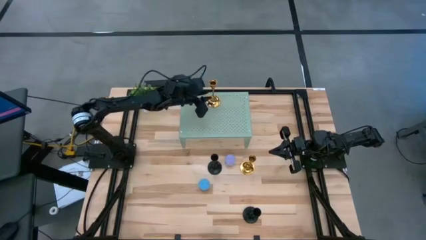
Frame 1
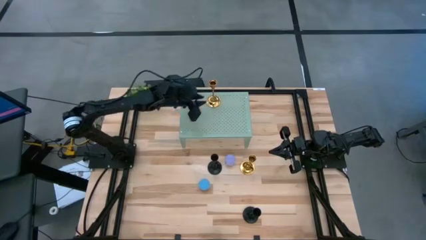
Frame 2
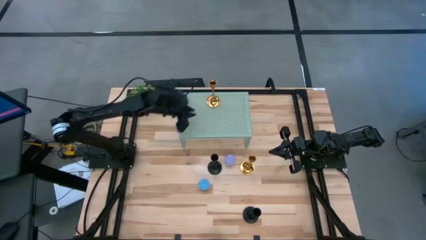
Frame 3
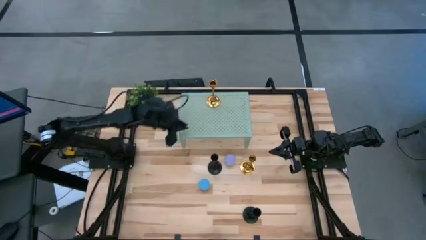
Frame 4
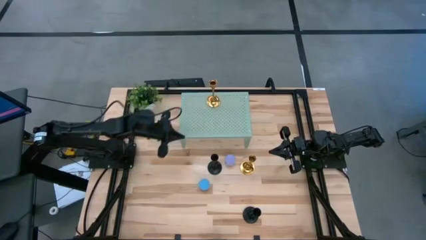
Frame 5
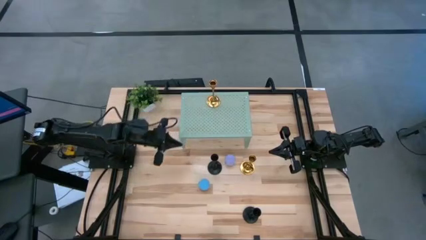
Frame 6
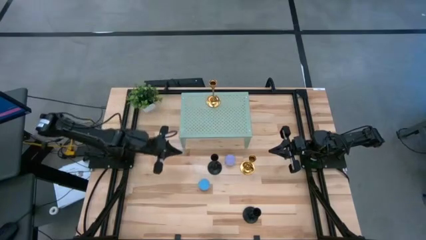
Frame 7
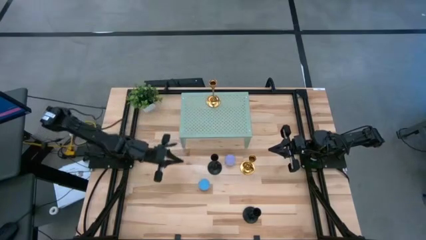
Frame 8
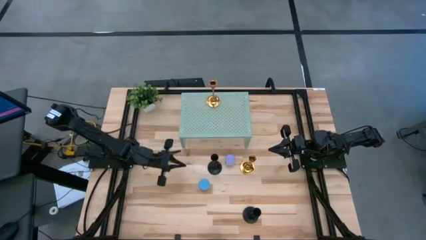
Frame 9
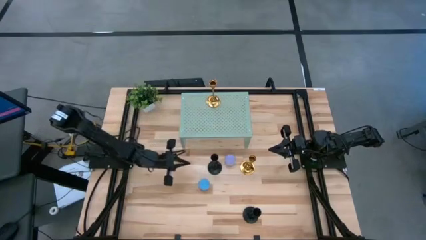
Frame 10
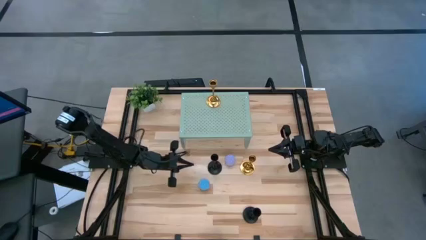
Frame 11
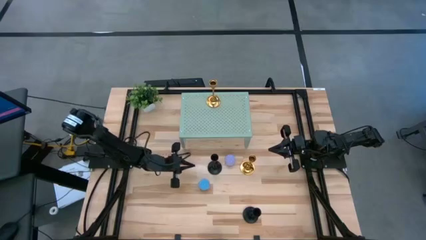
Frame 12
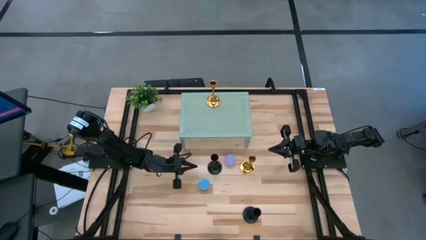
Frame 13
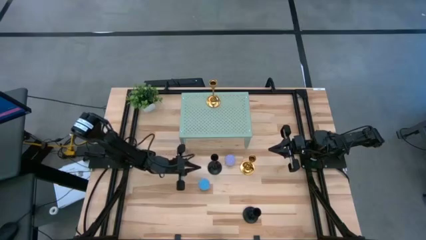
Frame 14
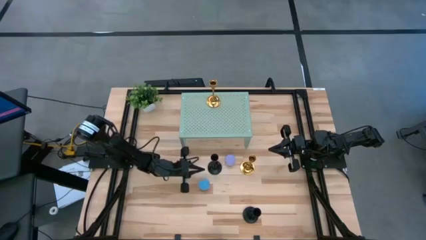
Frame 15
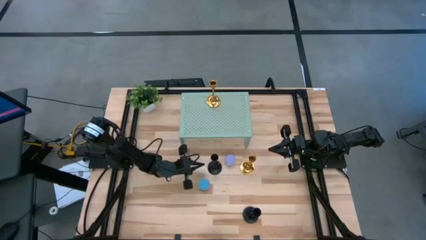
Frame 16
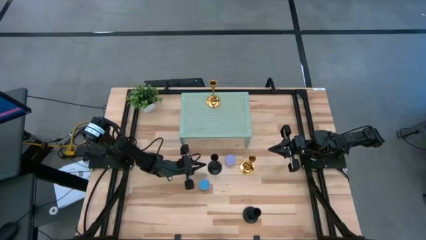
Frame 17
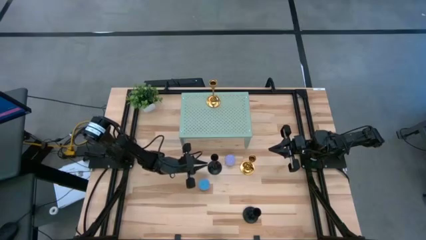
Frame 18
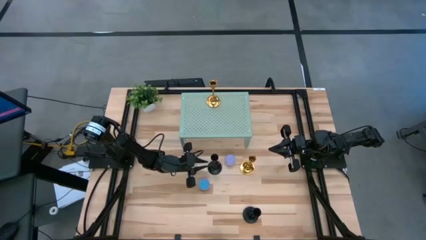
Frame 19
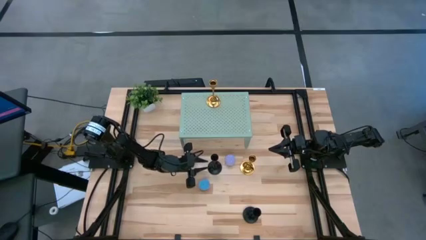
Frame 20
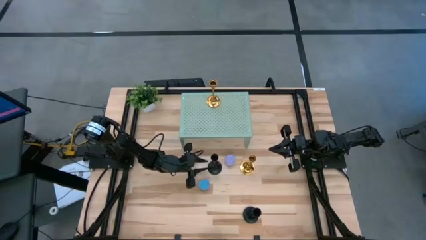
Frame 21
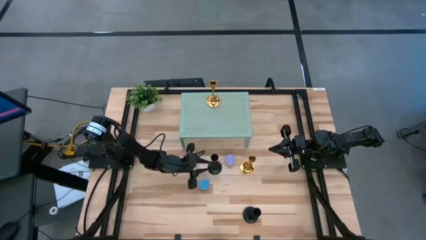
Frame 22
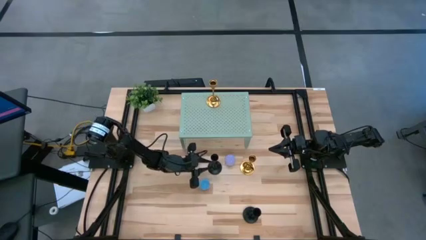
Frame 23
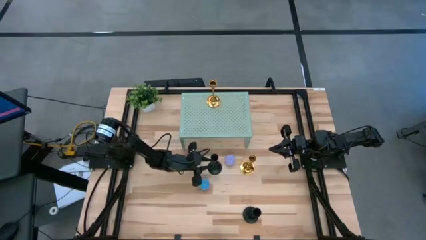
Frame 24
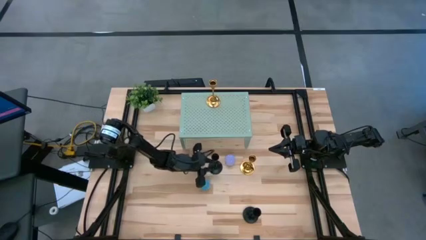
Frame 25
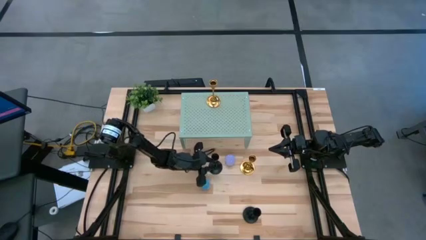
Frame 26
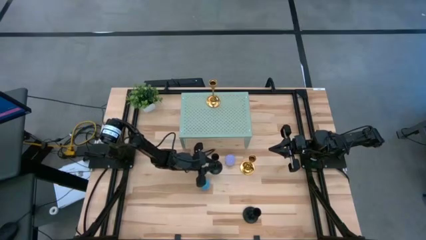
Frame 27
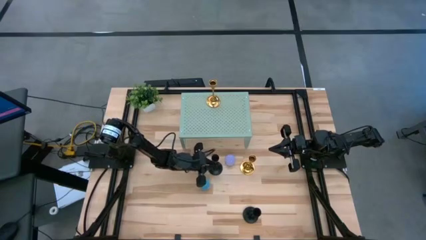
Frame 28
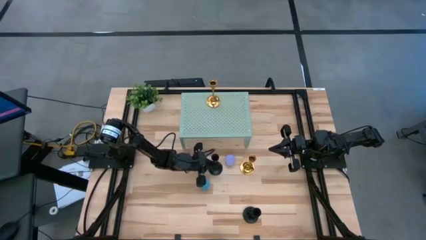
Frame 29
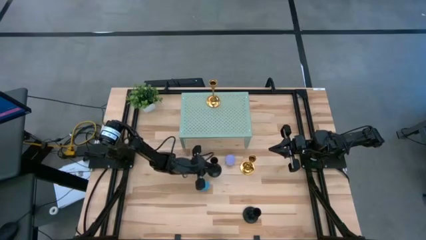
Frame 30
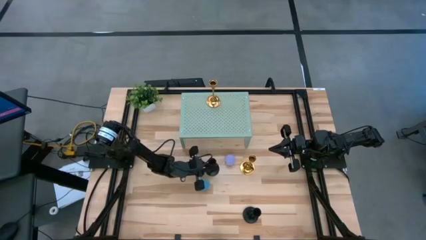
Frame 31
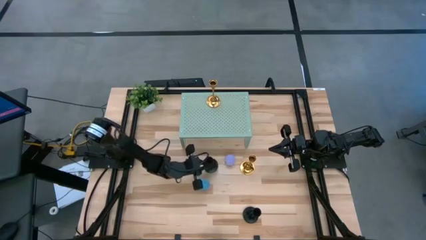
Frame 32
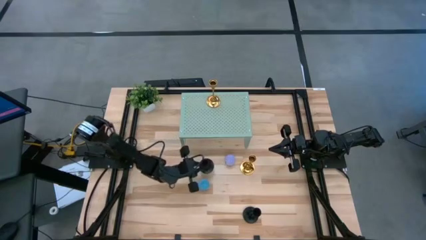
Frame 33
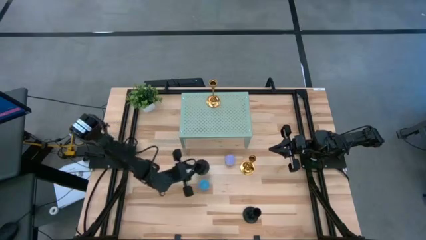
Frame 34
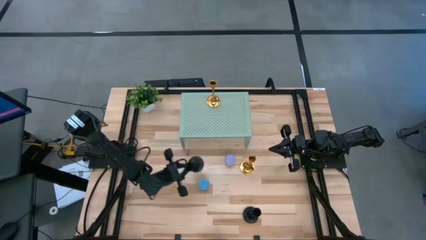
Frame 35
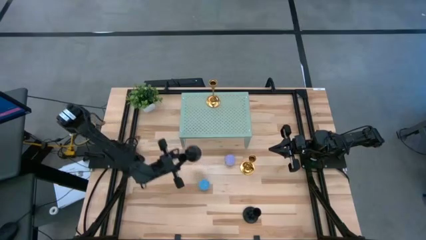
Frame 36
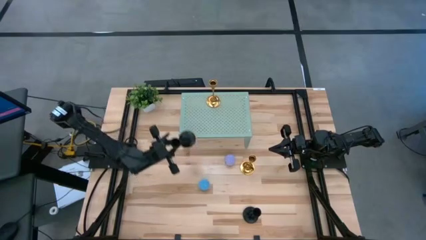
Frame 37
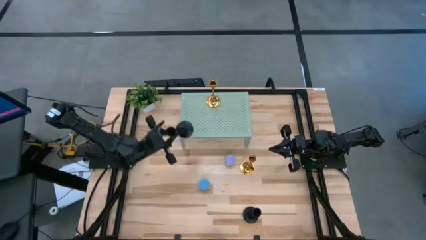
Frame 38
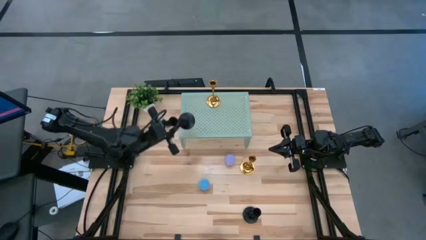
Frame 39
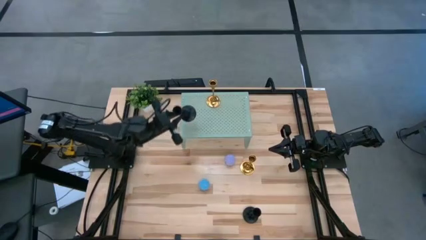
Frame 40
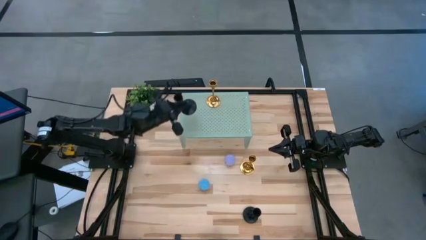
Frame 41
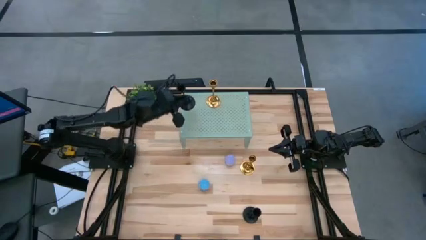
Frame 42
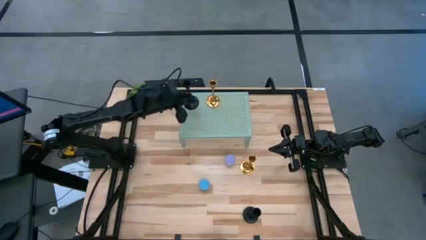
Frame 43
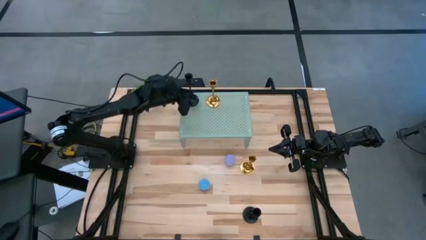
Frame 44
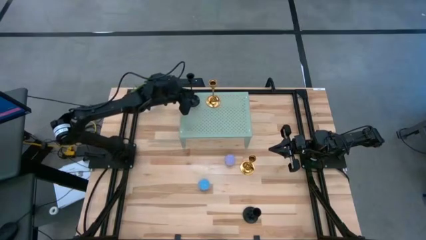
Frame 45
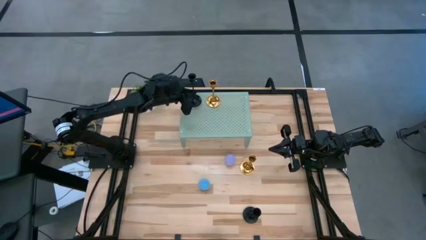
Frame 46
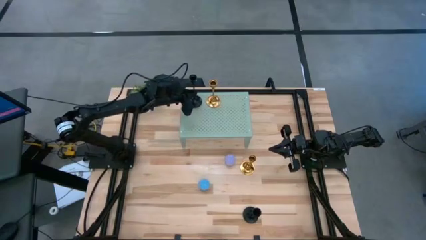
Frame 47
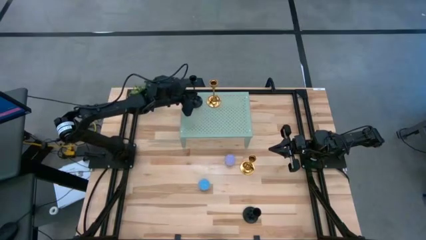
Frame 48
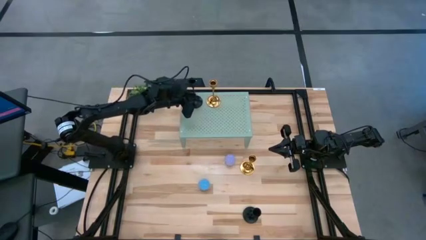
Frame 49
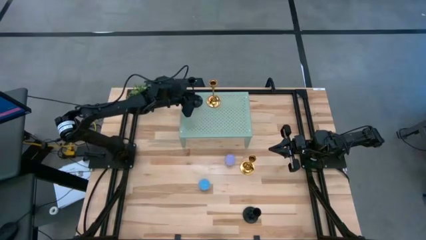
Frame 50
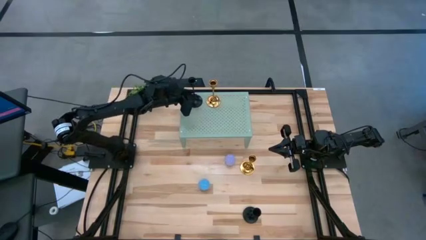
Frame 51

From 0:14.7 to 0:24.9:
Task: Pick & Place candle stick holders
Put the top left black candle holder on the shelf
